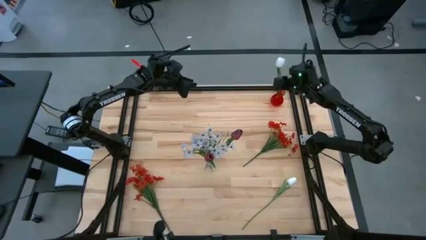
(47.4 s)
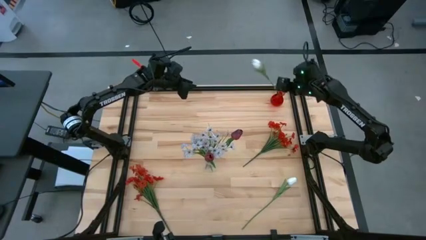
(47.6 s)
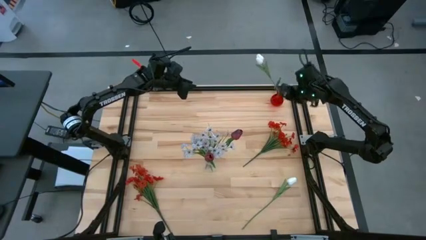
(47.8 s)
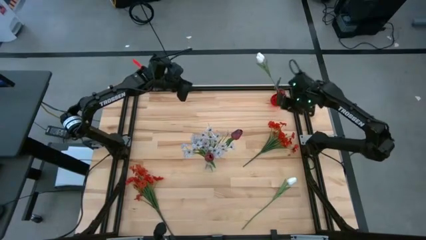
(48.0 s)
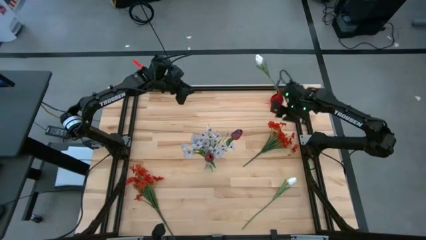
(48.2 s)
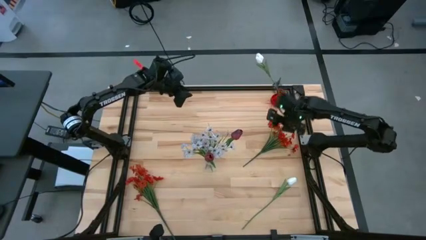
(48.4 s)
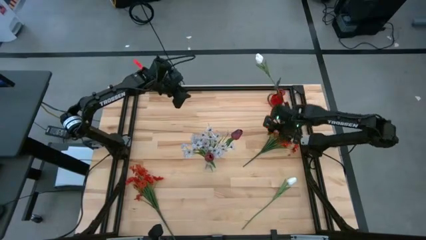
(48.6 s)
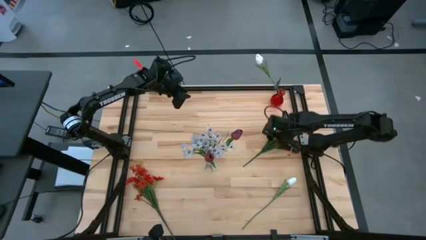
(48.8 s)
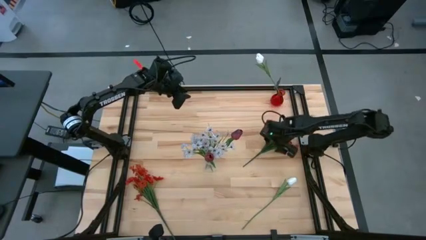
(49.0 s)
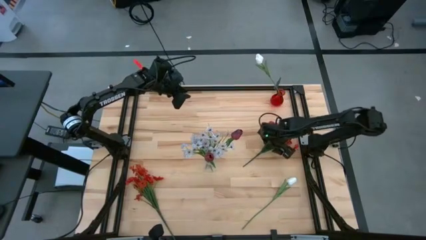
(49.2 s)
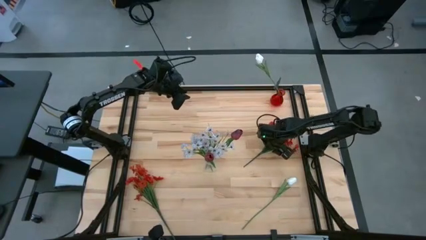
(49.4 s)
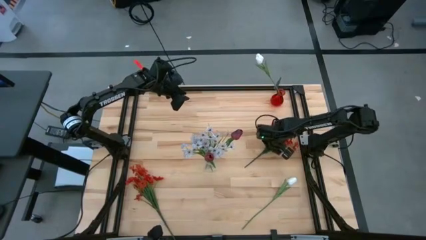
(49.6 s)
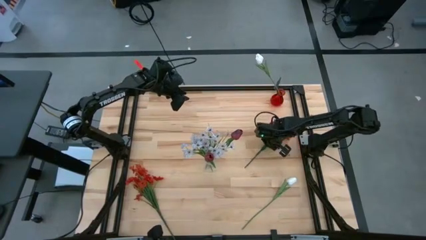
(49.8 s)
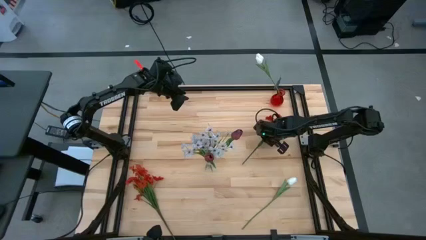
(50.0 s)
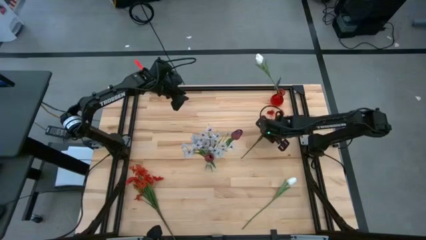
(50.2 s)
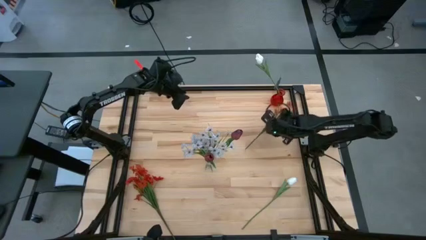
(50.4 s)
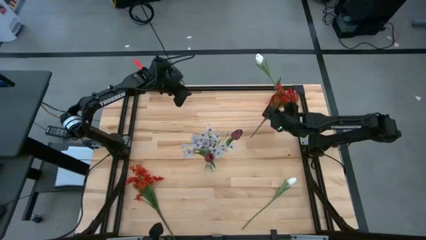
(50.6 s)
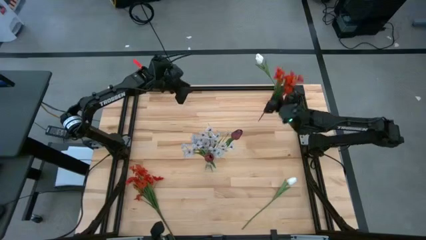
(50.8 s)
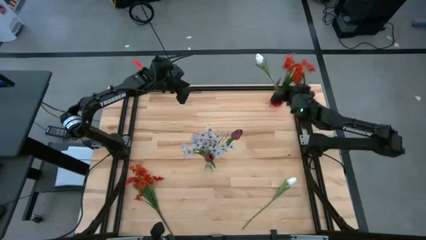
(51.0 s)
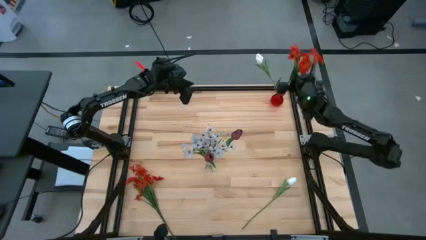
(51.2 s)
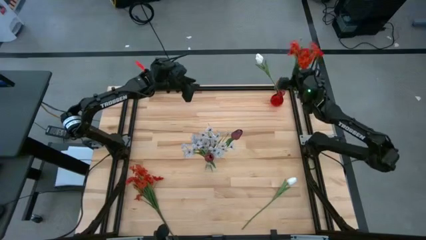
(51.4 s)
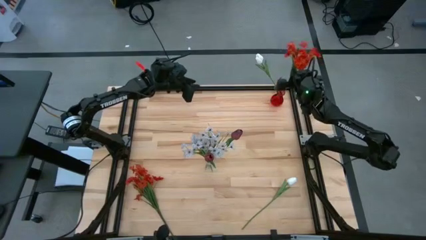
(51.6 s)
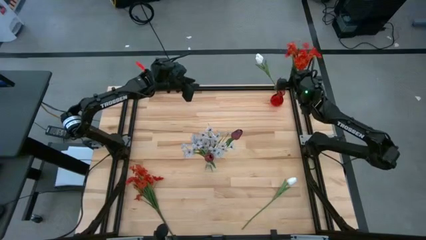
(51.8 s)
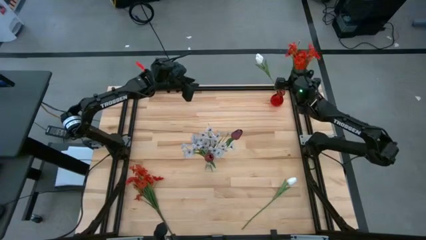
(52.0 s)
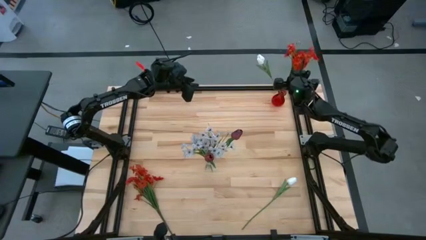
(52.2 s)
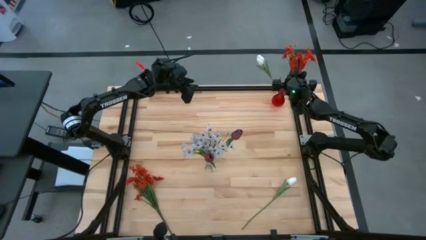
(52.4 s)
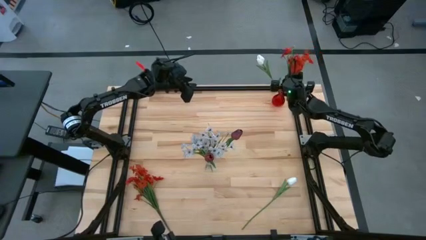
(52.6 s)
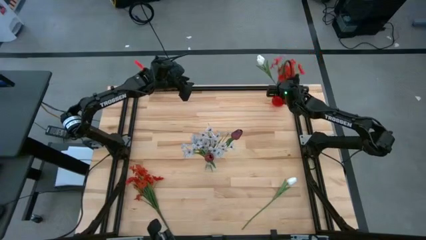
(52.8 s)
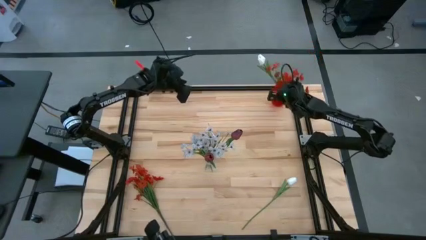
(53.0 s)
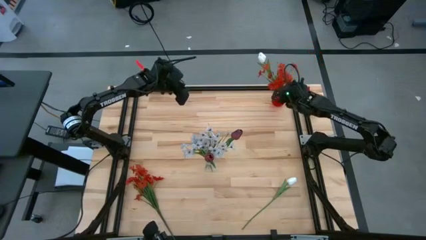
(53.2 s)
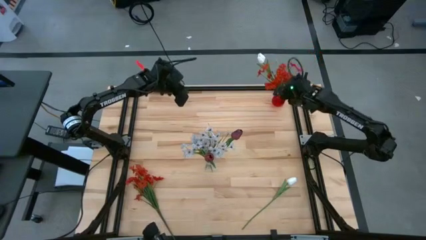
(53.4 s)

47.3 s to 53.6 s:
Task: Sort flowers into vase by color
Put the right orange flowers into the red vase

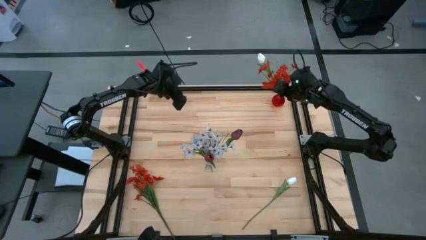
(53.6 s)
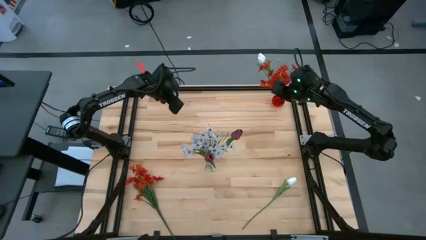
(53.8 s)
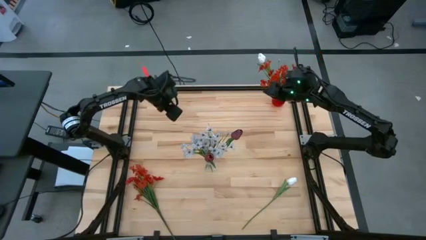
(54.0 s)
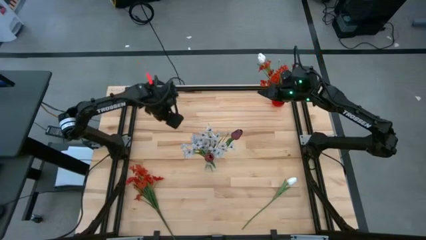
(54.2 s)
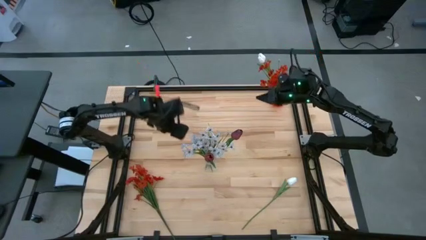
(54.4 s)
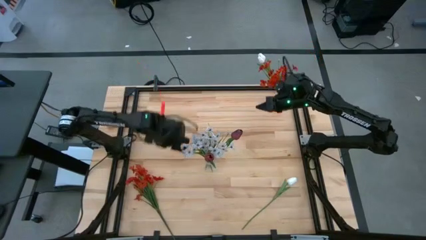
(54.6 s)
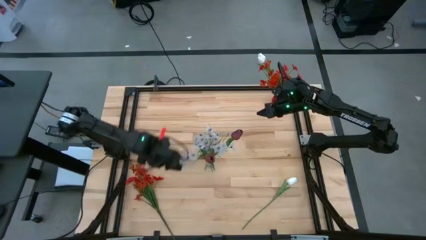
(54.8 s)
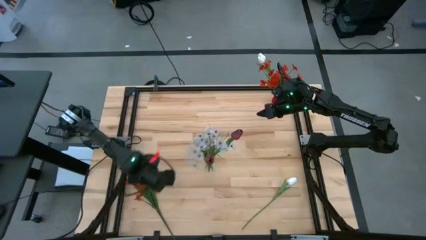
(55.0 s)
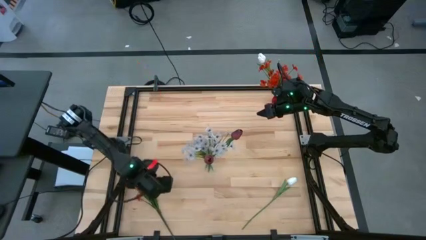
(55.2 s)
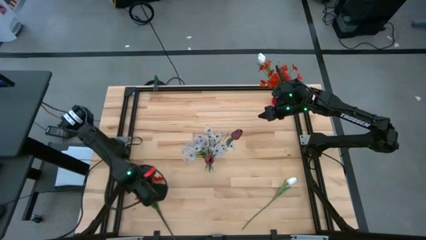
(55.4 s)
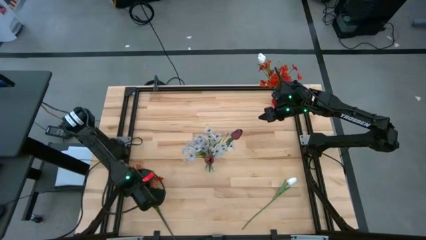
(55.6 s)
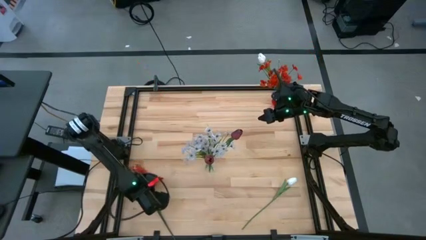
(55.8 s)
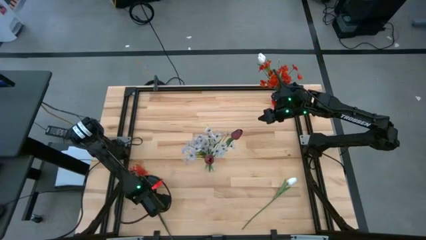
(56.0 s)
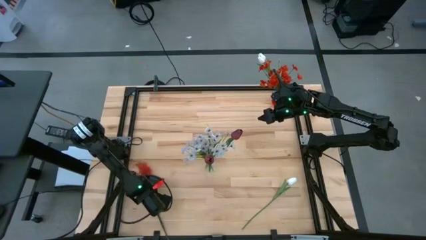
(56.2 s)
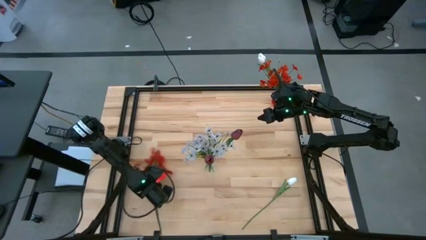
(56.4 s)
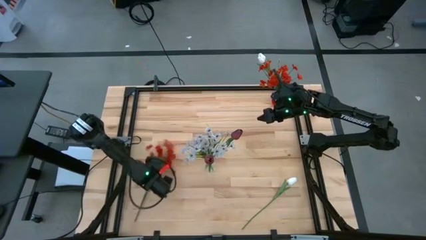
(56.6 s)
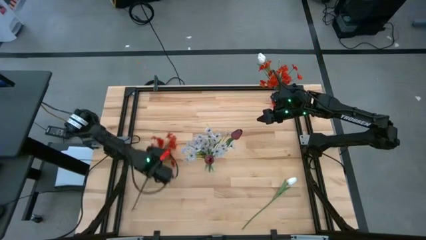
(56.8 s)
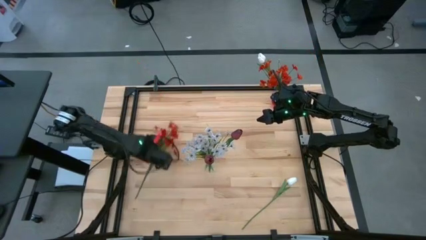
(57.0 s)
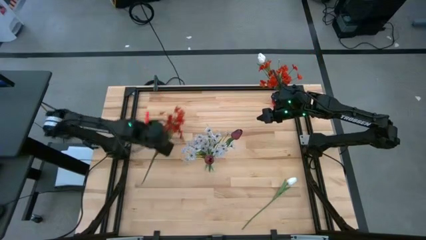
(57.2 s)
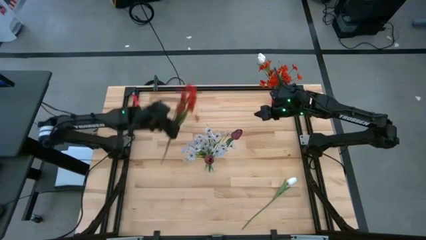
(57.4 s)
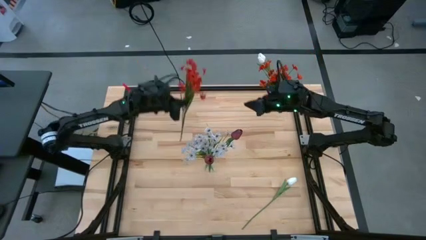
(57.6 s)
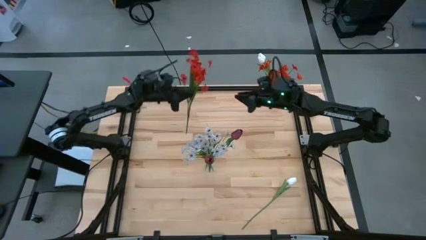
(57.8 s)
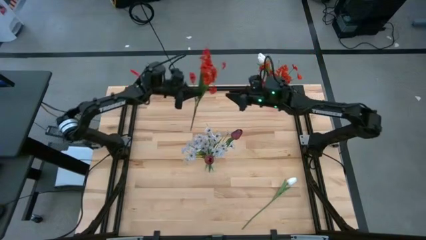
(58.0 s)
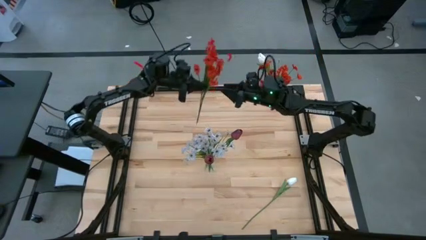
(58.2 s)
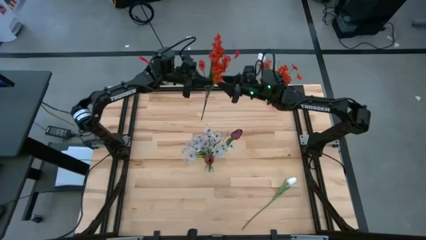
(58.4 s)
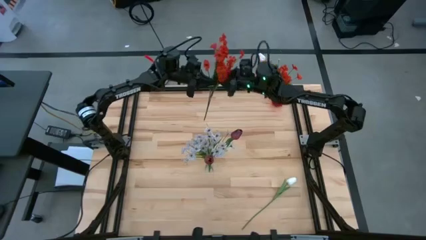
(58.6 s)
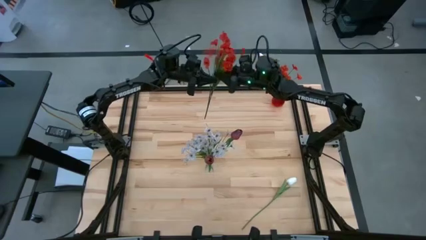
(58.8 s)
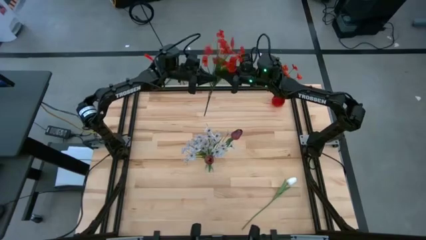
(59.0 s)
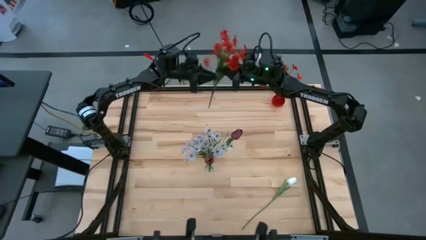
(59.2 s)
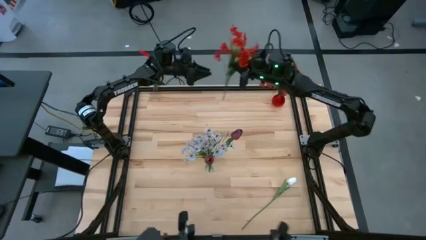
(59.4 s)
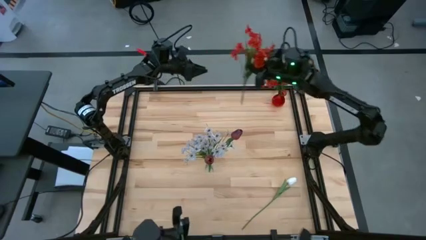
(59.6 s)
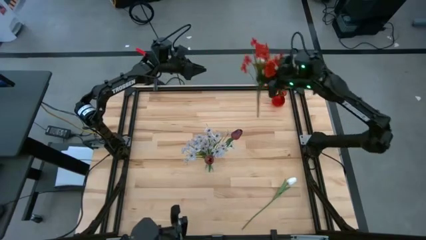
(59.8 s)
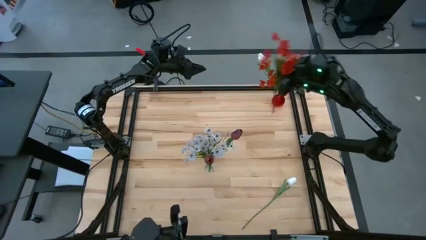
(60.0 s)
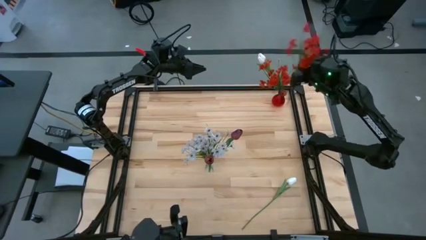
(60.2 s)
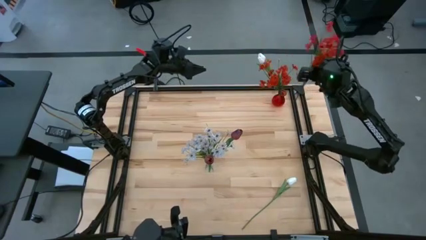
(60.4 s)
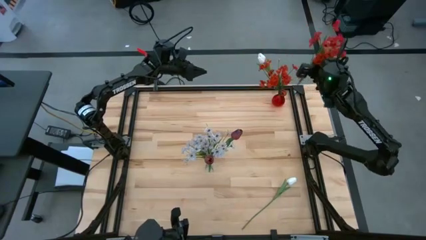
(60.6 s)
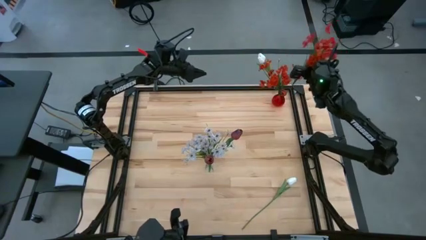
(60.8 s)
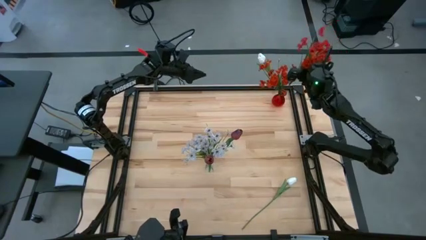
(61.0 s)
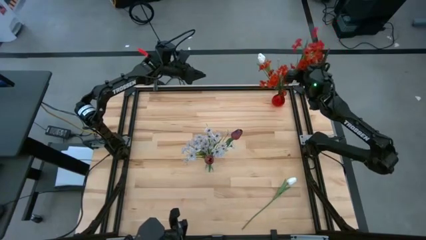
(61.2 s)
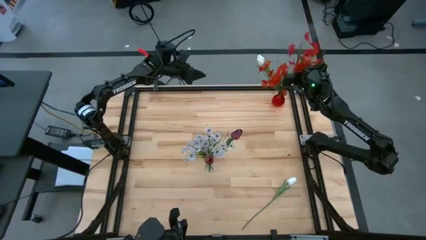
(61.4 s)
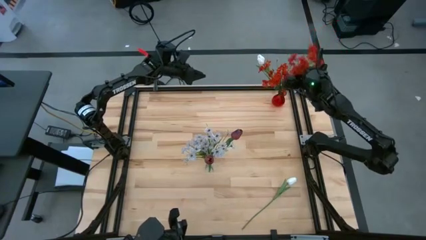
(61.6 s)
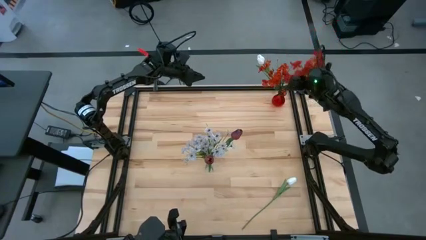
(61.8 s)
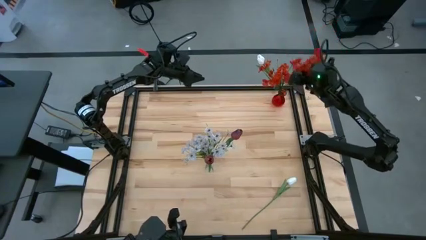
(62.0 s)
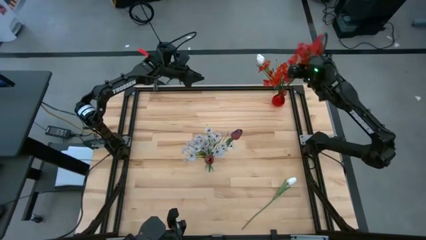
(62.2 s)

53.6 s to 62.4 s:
Put the orange flowers into the red vase

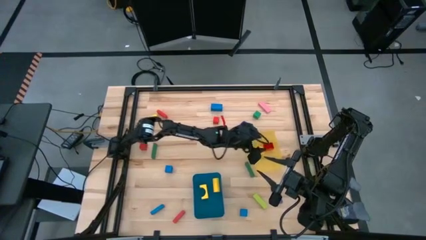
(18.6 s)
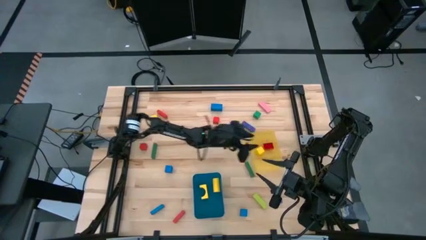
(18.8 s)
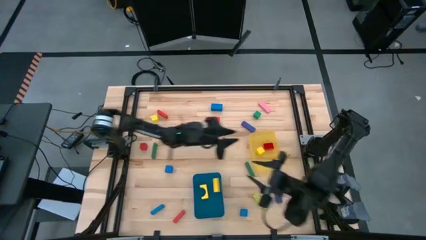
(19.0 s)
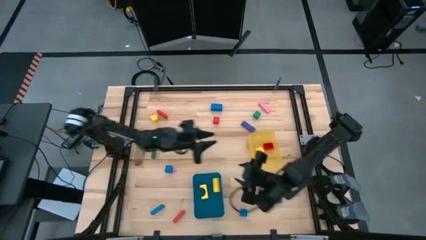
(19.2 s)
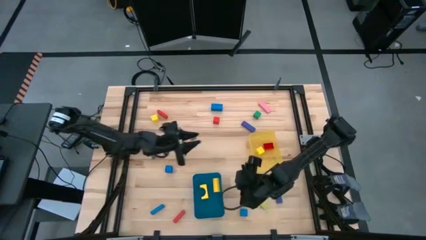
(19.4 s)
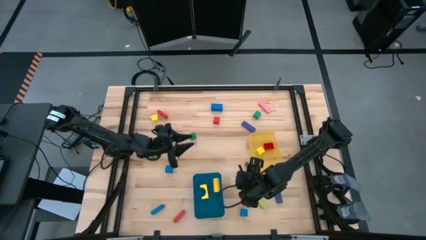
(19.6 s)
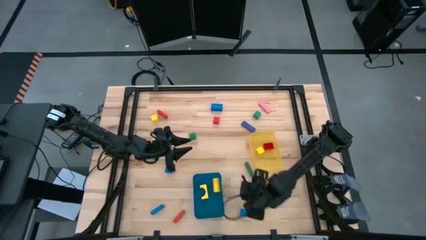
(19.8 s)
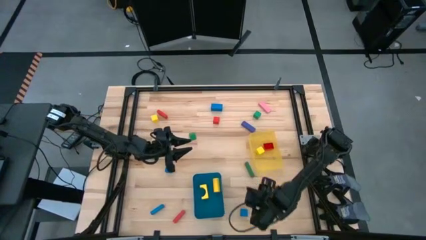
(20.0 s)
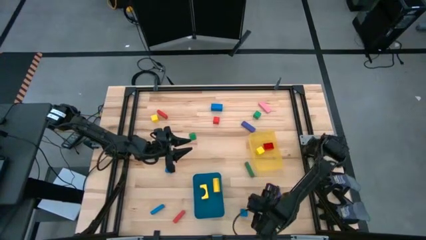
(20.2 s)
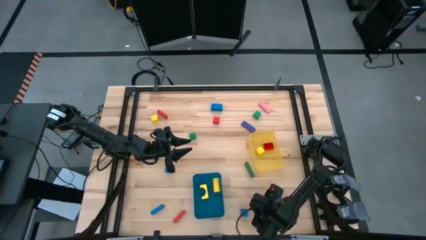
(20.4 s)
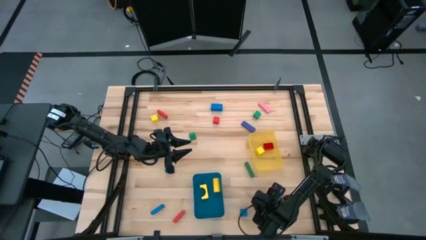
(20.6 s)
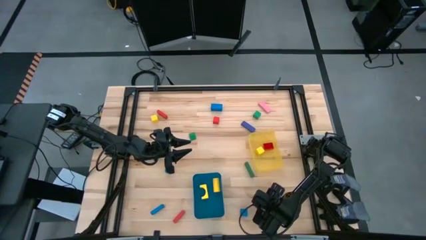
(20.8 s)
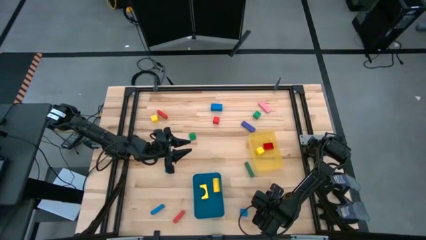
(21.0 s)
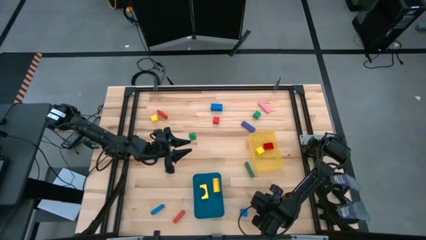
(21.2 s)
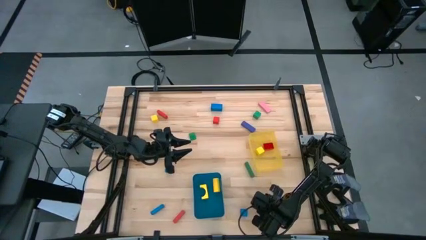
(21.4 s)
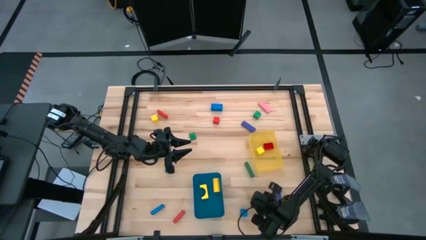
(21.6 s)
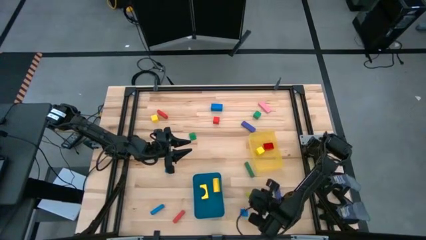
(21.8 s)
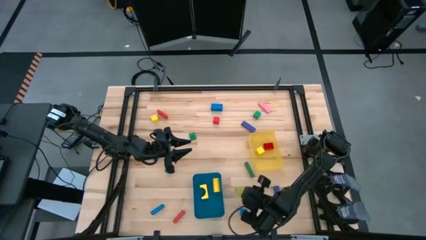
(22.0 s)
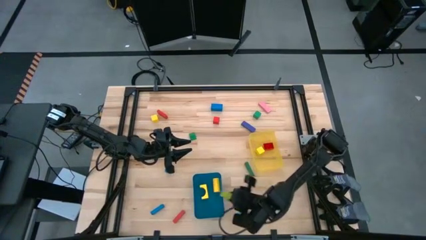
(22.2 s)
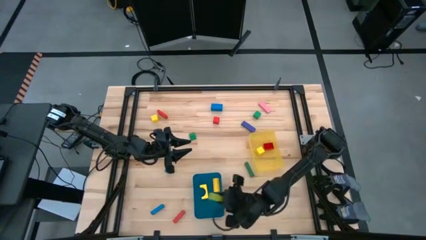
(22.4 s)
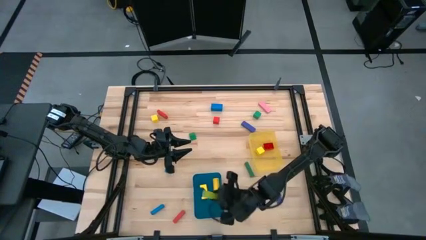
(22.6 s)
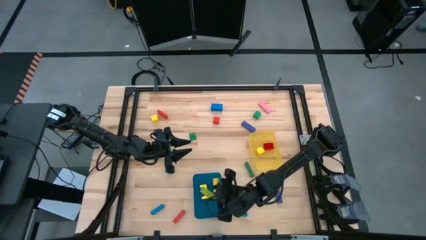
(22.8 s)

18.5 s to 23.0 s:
Task: Sort blocks by size
Put the large light green block into the blue bin
